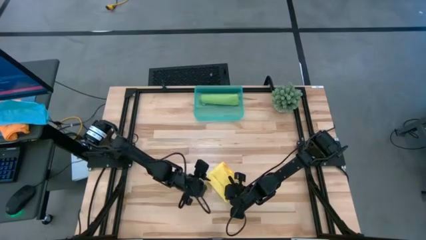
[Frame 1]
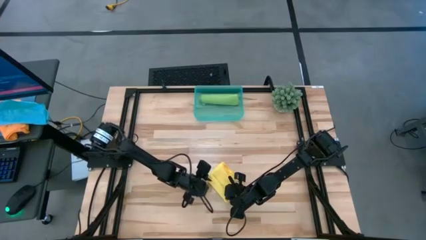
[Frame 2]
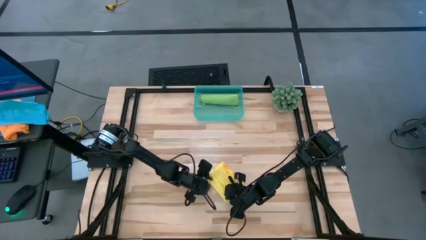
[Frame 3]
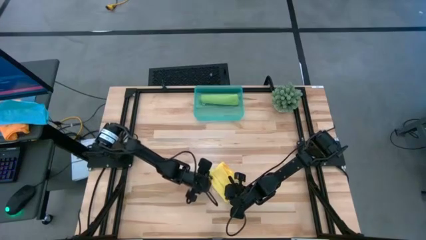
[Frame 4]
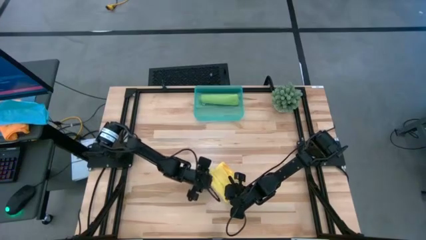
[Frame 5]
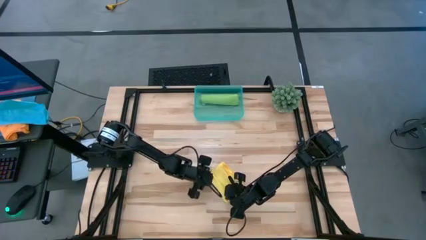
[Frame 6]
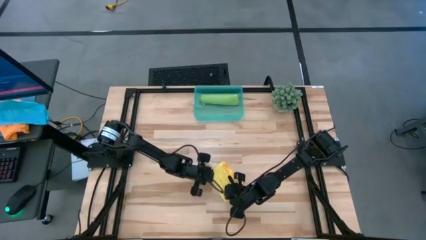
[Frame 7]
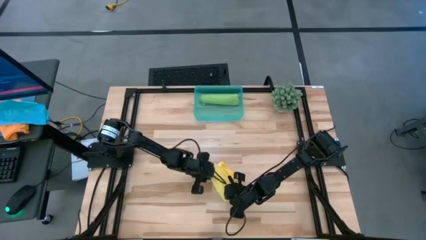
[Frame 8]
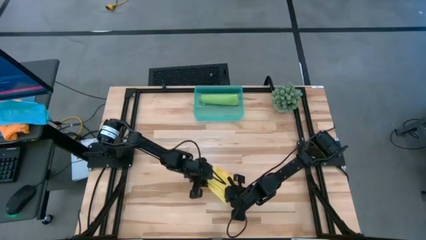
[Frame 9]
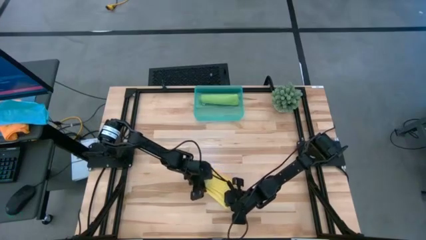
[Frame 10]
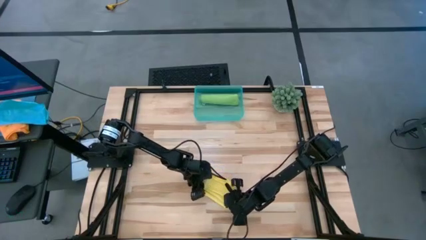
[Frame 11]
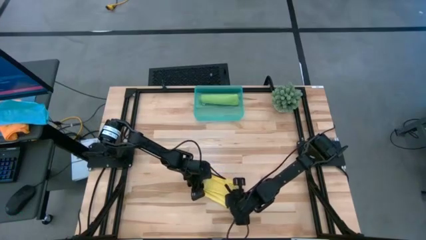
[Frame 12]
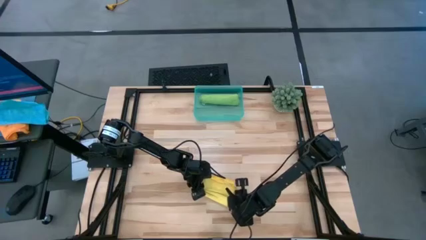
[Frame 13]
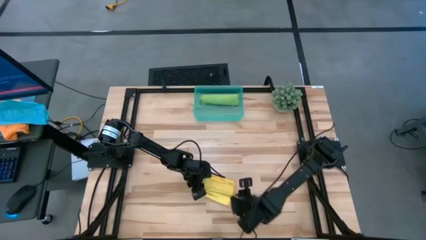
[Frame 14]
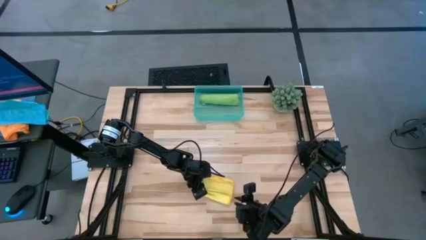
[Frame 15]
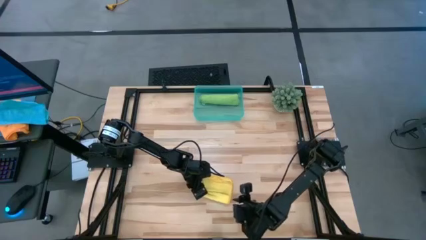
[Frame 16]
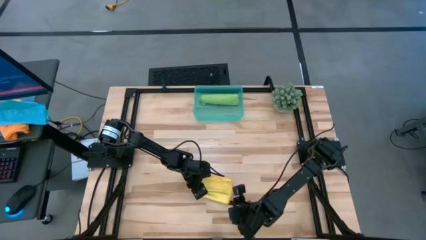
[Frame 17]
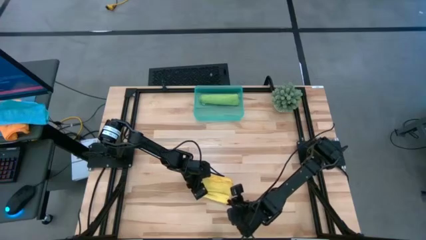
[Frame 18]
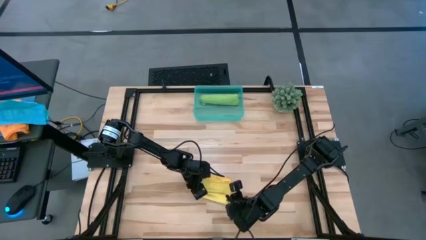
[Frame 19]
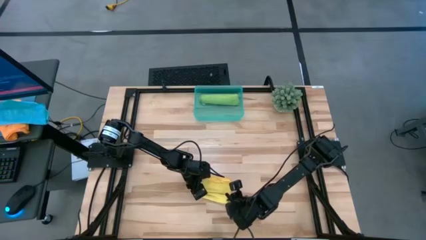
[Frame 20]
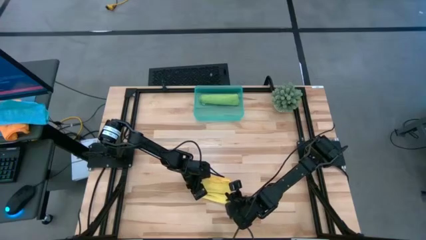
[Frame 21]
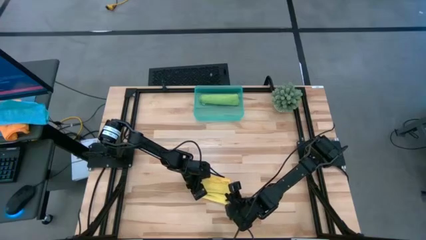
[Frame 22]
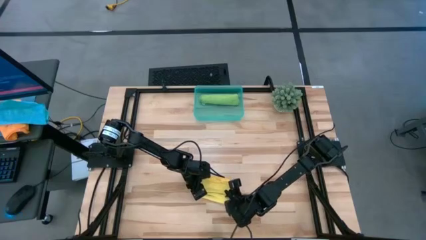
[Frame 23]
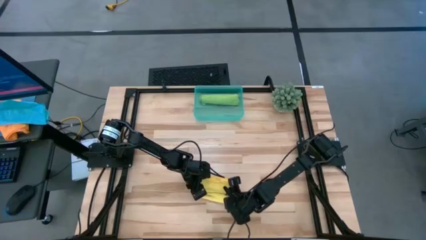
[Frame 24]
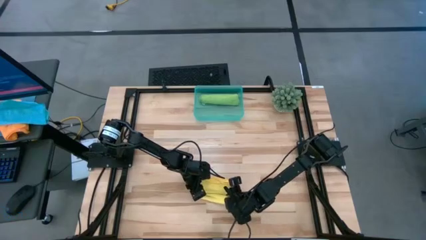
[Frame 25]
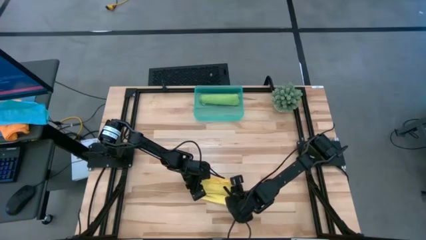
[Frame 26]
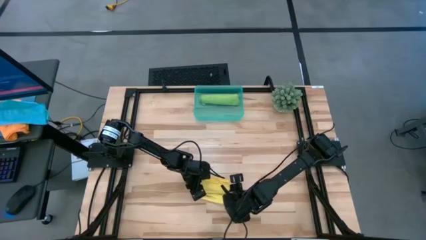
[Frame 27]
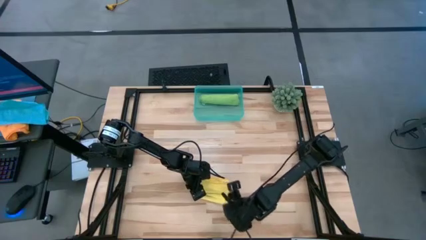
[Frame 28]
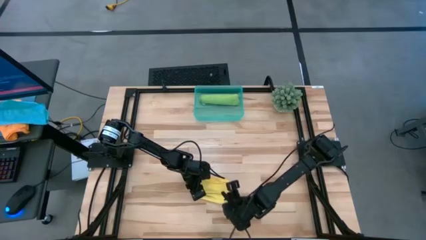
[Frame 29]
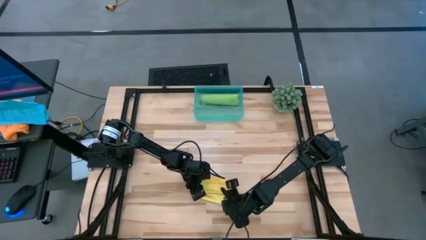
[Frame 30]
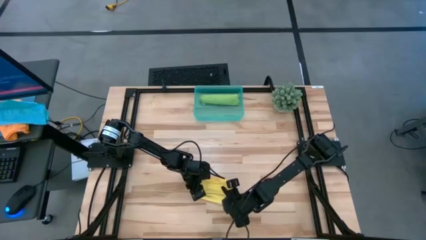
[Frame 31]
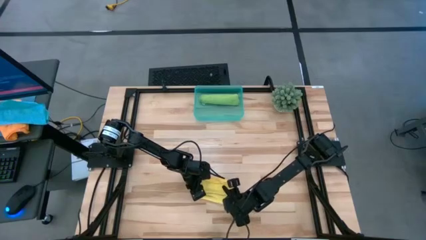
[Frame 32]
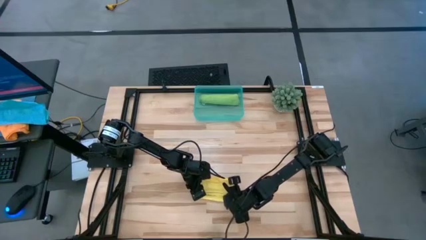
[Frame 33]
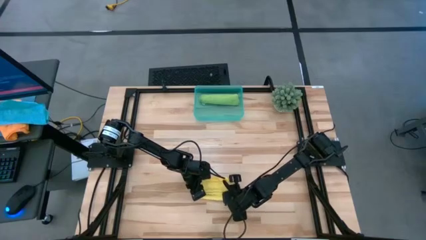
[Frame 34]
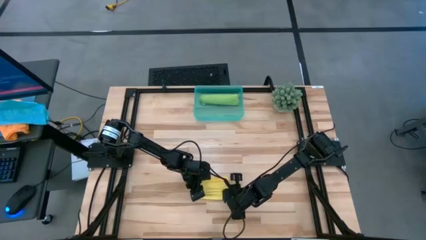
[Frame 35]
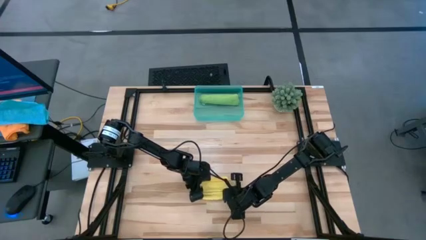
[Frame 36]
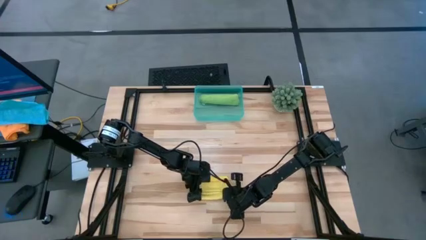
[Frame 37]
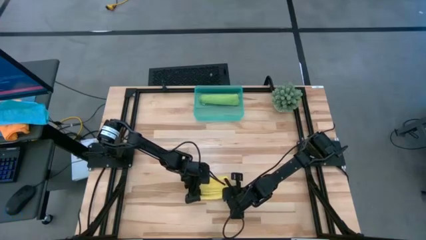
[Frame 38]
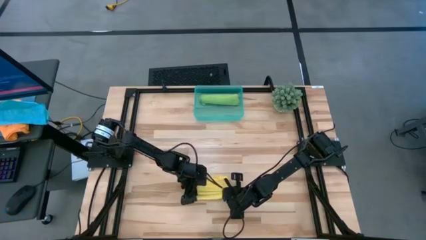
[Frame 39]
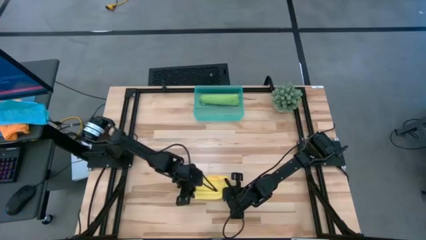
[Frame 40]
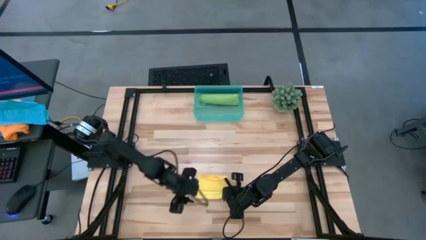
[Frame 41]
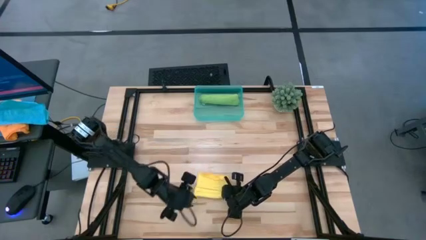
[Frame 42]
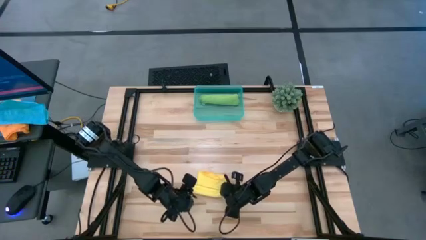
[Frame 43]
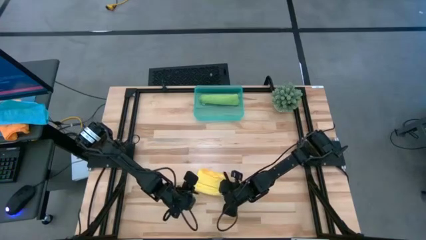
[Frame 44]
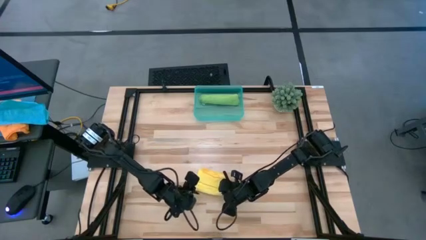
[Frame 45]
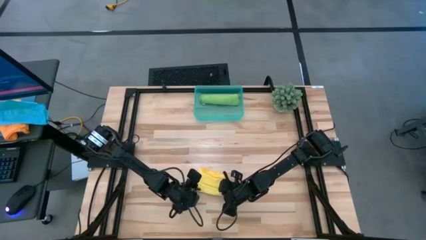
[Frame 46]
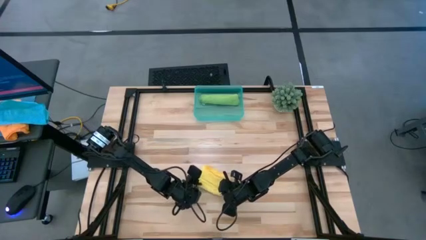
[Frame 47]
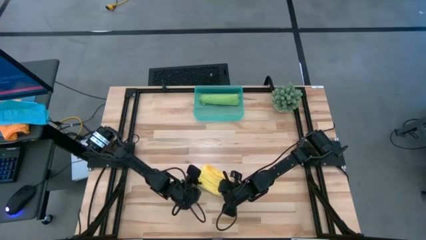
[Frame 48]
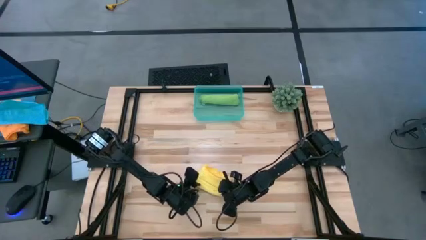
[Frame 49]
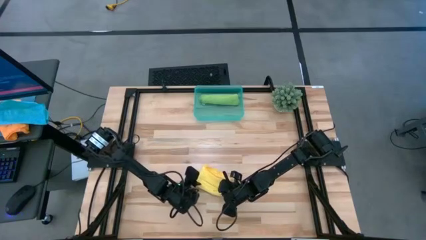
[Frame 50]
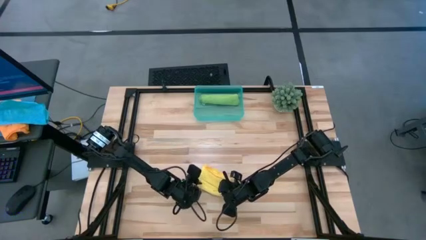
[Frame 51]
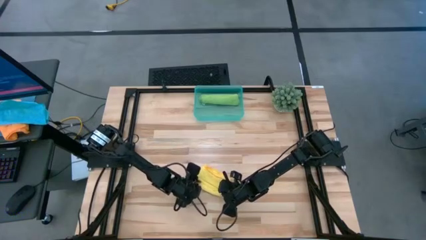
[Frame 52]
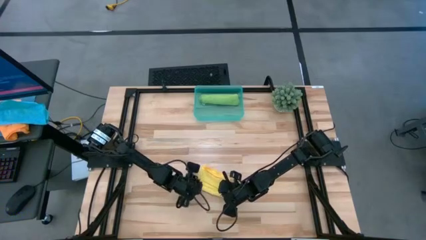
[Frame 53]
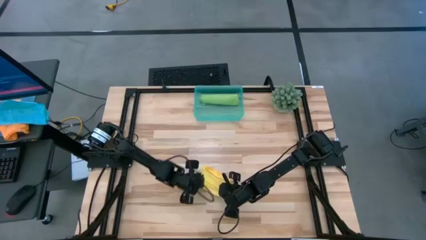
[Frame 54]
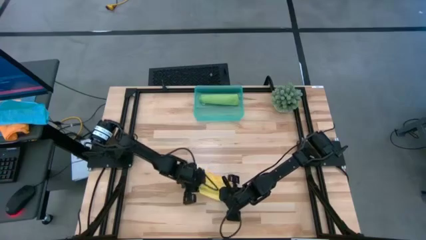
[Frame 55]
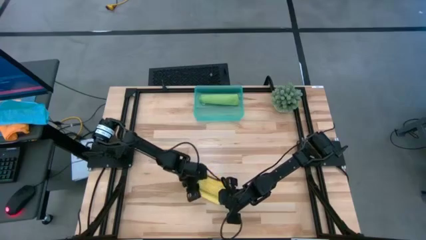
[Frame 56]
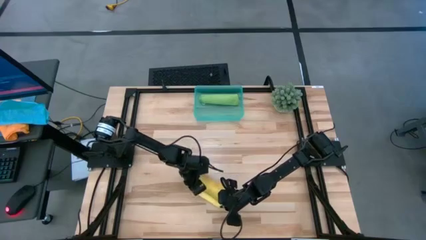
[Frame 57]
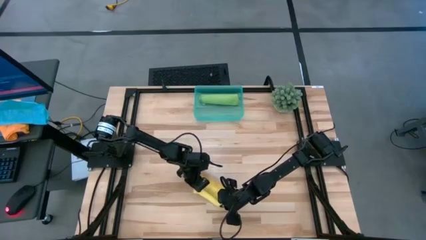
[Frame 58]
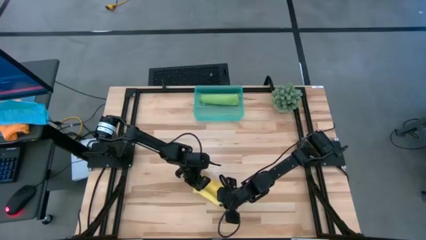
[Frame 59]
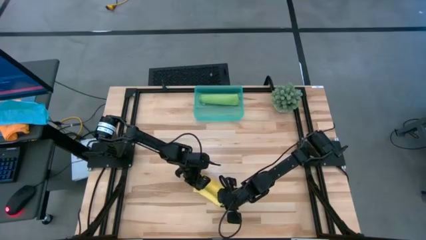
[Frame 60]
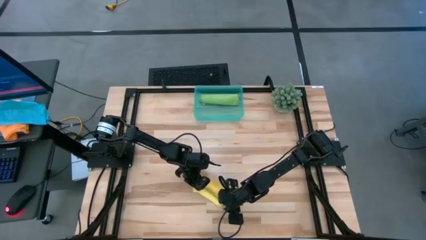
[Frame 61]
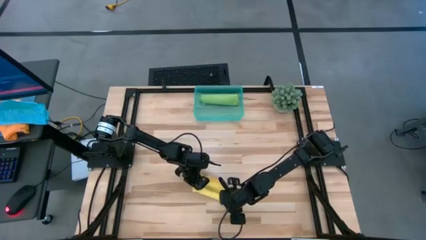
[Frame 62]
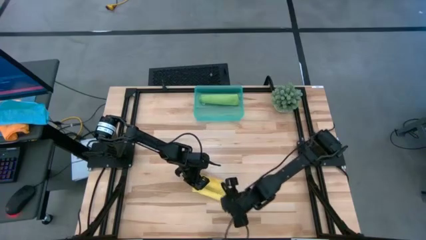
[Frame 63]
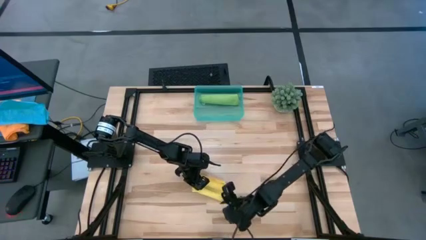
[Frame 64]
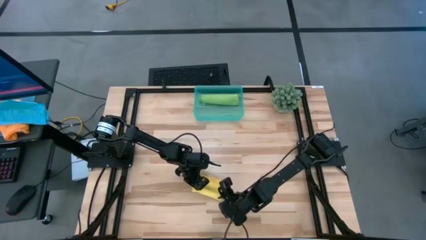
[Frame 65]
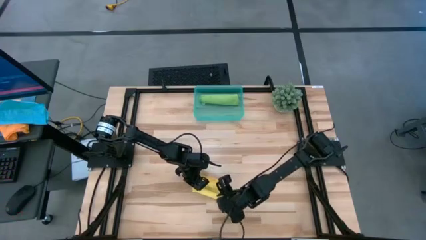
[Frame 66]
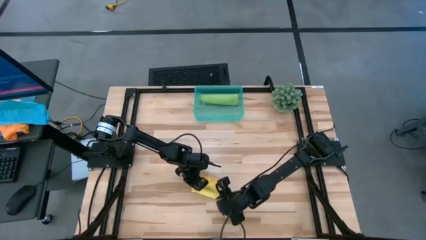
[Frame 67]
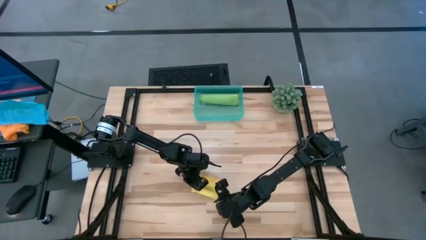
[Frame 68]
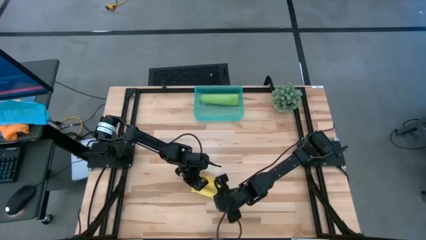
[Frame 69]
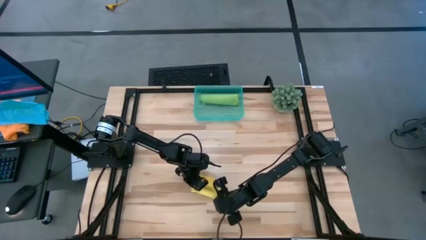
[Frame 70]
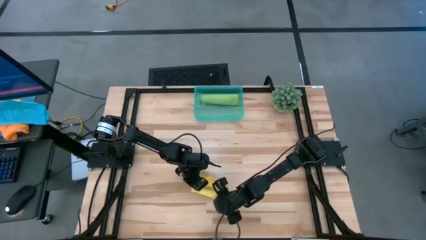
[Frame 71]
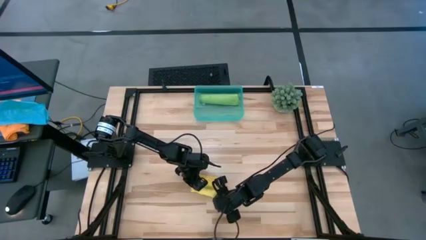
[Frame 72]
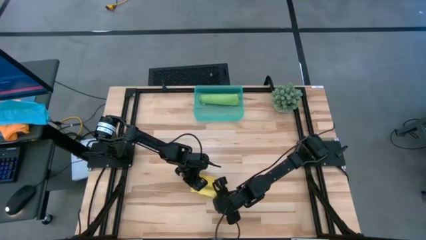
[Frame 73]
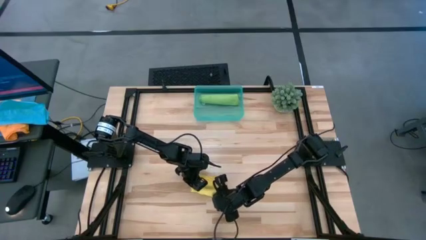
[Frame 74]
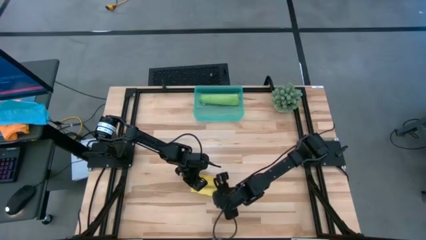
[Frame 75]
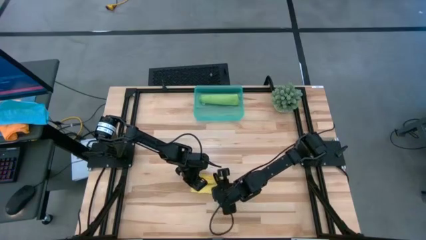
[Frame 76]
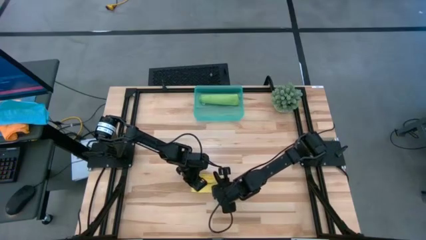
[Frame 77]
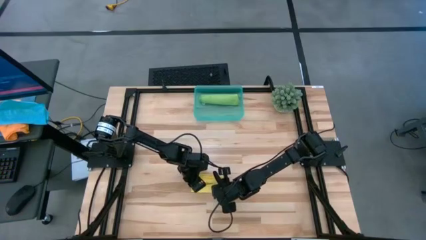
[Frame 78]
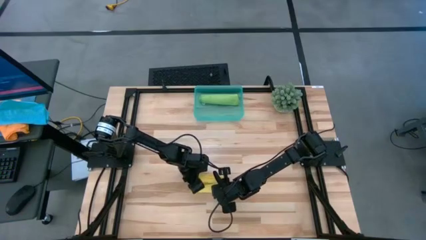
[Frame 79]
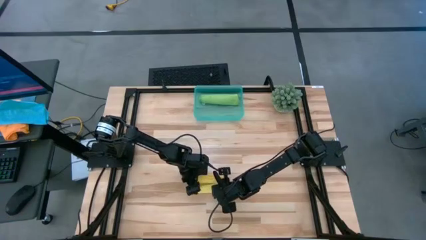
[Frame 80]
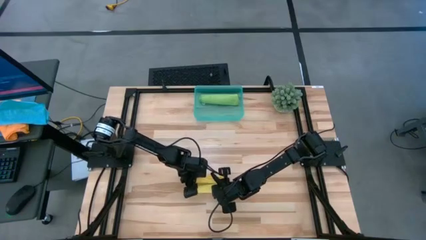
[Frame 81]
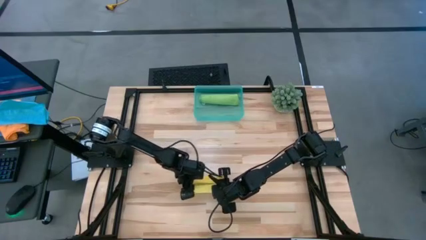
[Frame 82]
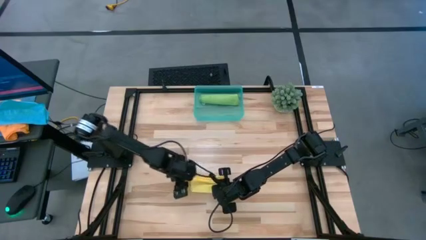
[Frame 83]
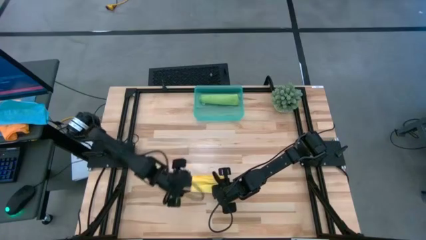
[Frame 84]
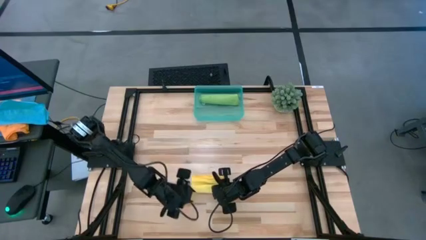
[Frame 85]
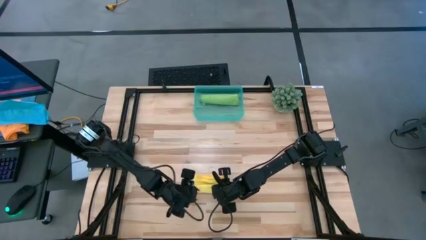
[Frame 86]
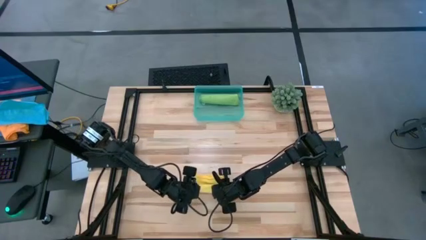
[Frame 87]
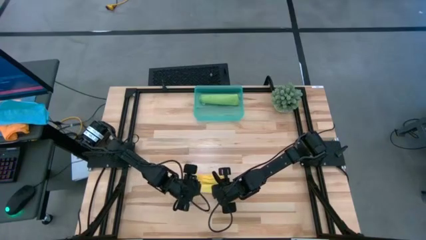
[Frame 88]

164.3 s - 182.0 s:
Task: Roll microfiber towels into tight, uniform cylinder then place into a basket
Roll the yellow towel
